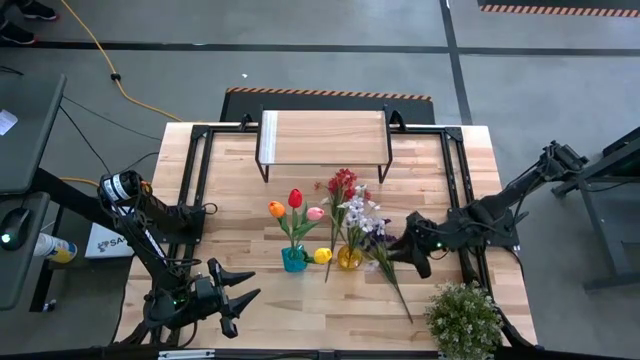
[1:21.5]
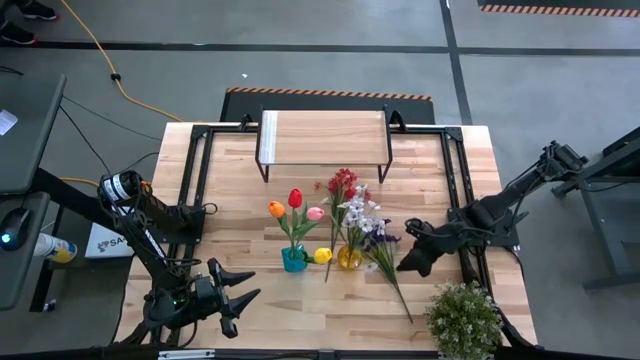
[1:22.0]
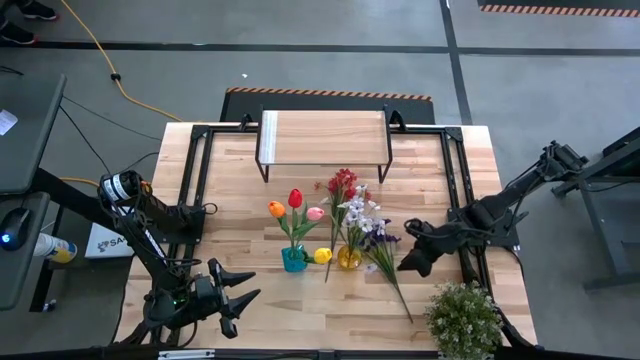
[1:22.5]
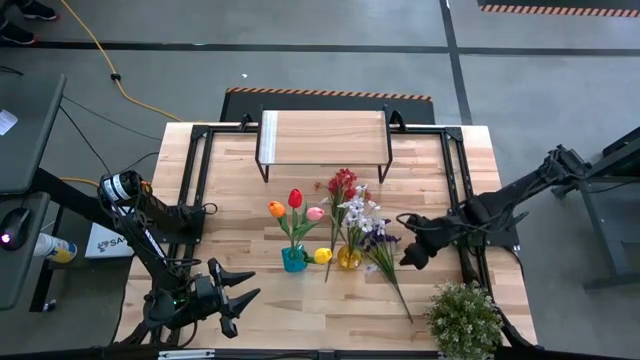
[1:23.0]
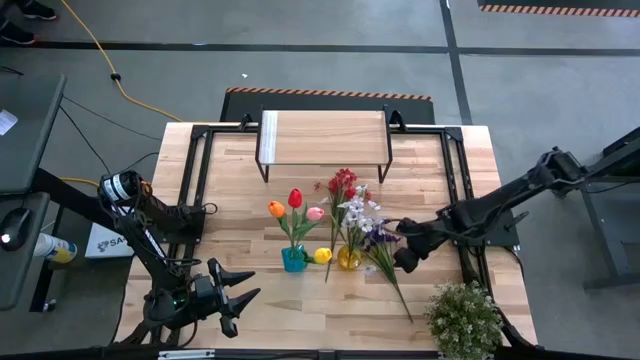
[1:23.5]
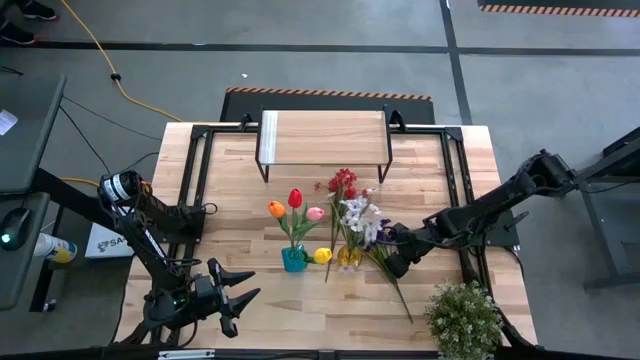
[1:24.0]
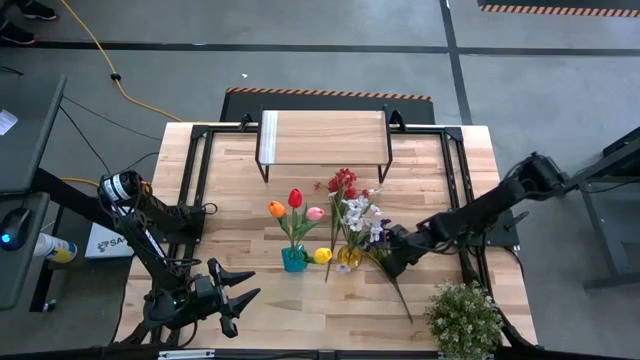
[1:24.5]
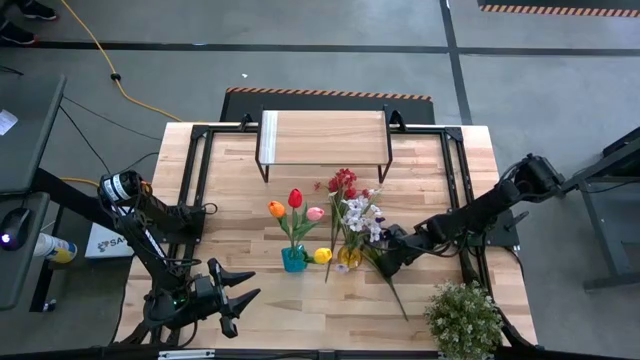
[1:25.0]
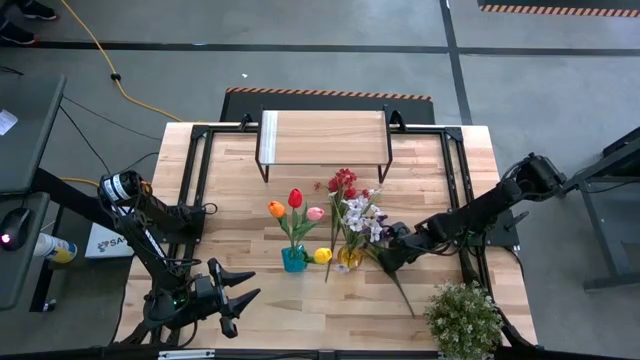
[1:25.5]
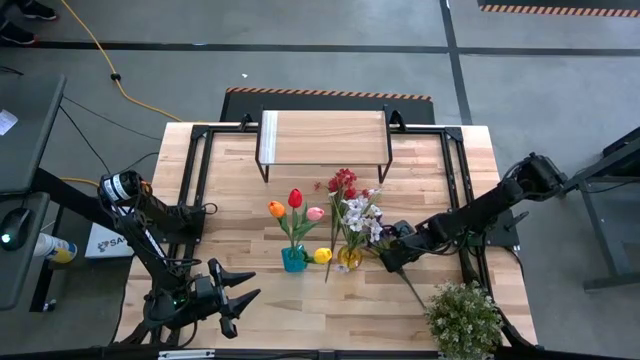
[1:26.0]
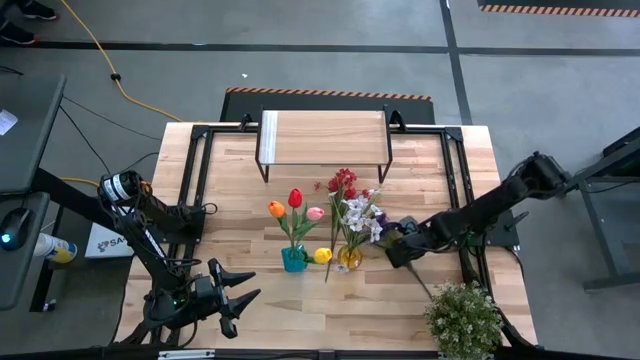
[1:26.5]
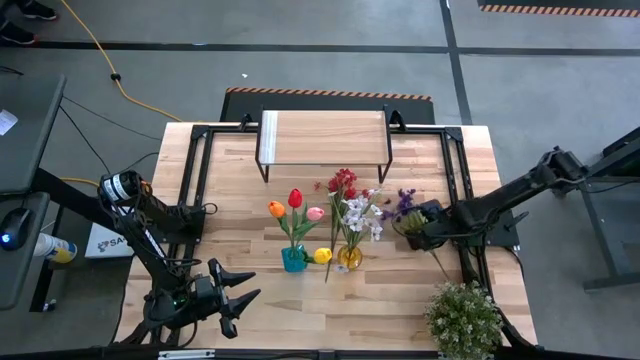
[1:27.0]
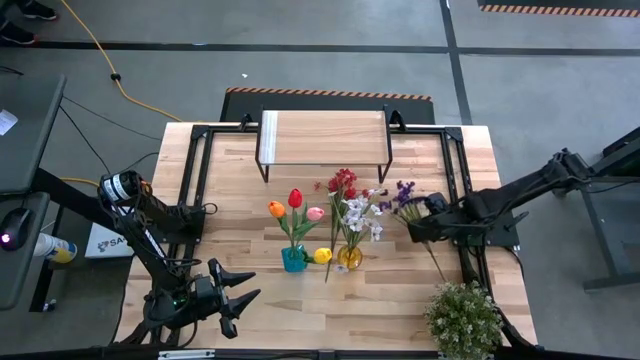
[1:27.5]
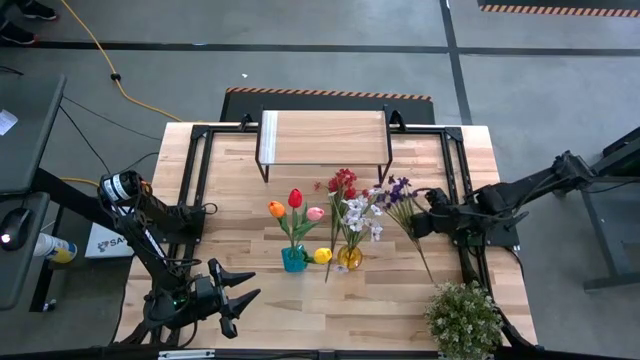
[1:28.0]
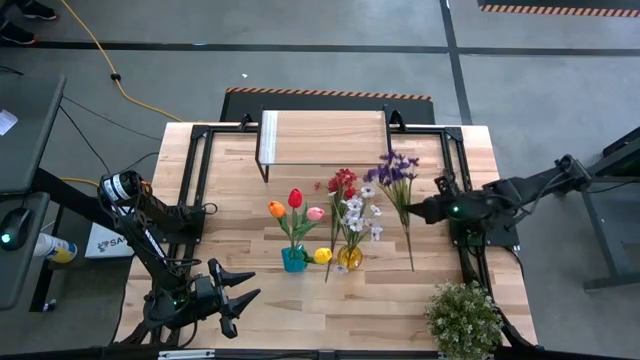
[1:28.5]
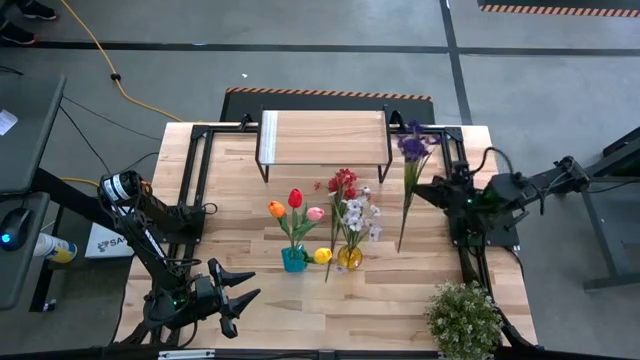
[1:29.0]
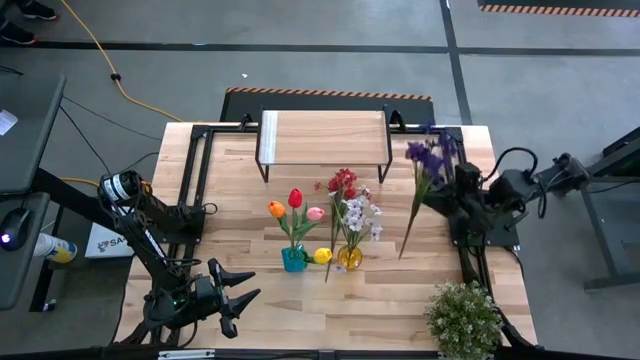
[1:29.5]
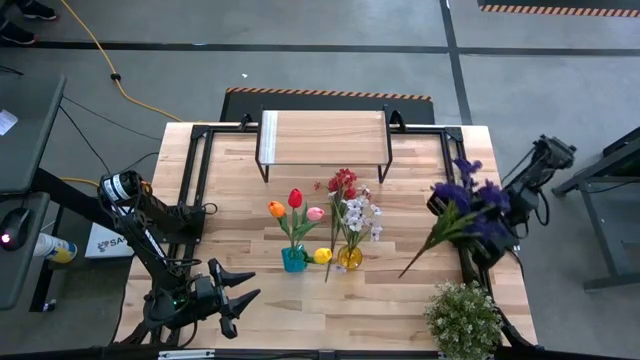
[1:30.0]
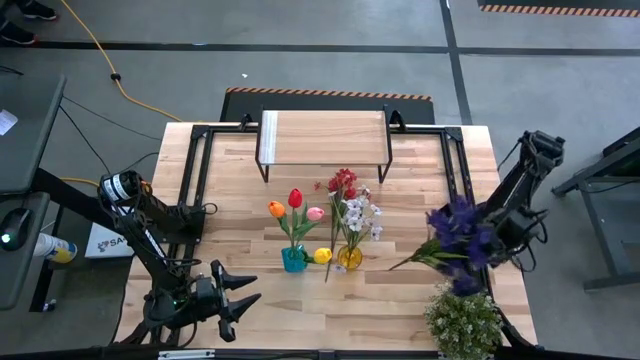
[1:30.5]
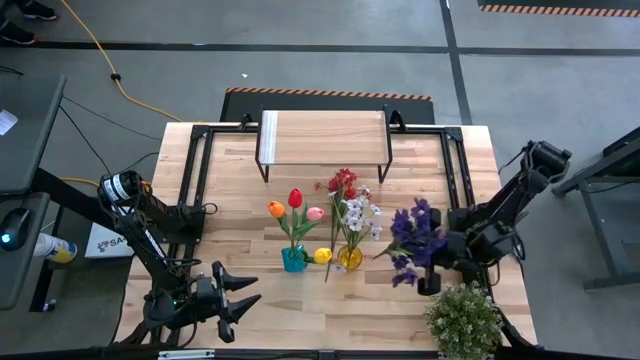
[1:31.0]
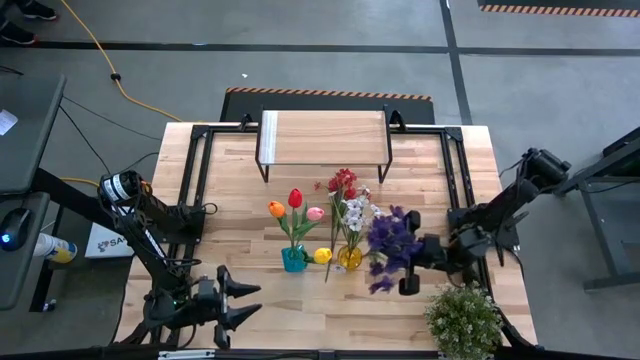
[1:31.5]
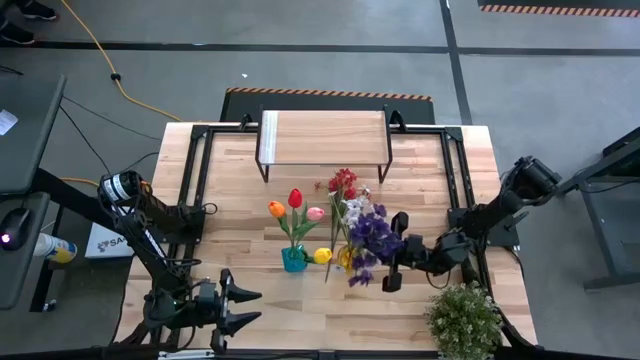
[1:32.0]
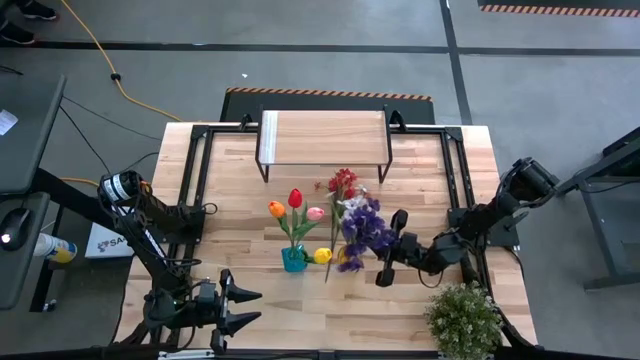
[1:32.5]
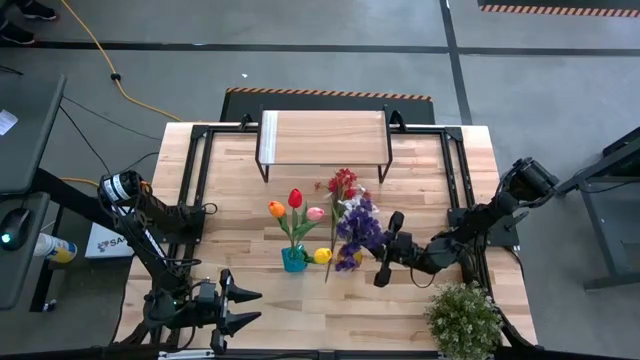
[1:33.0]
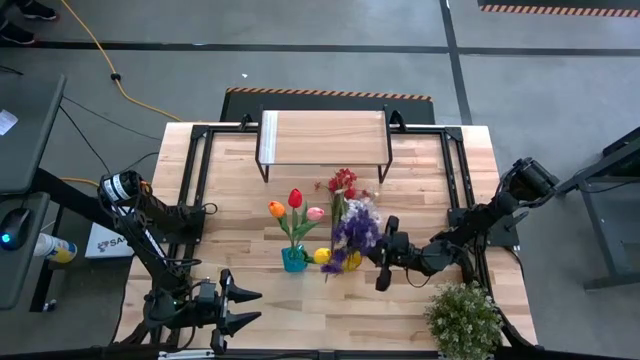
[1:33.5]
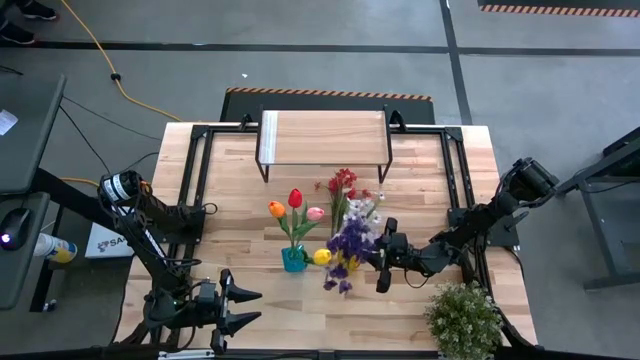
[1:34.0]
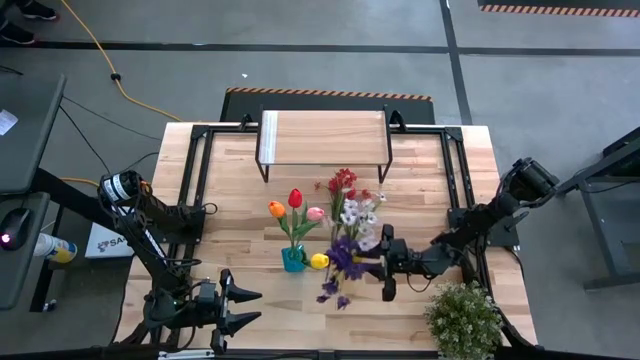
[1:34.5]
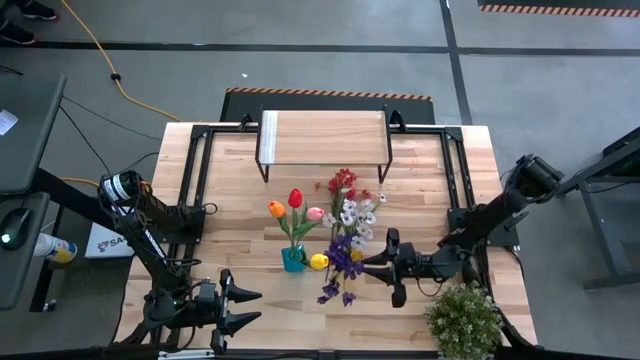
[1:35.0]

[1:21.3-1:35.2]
Task: Pick and place flowers into a vace then onto a shelf
Put the purple flowers into the yellow vase

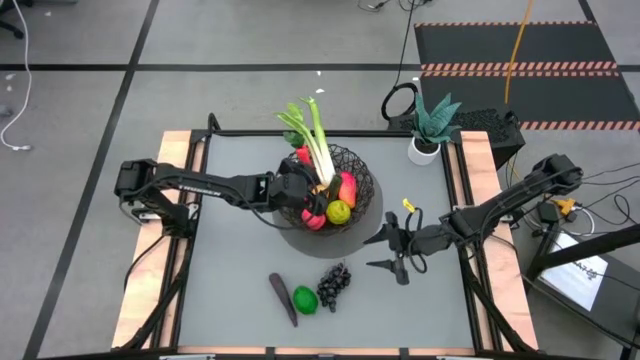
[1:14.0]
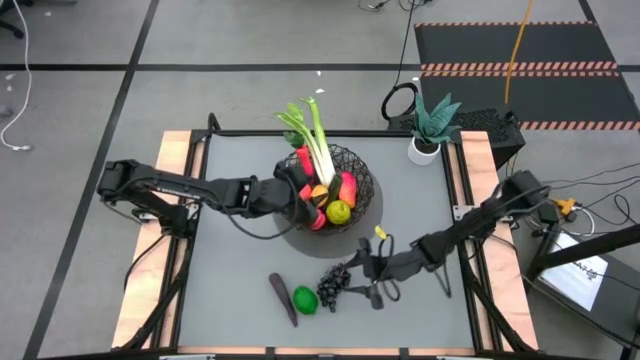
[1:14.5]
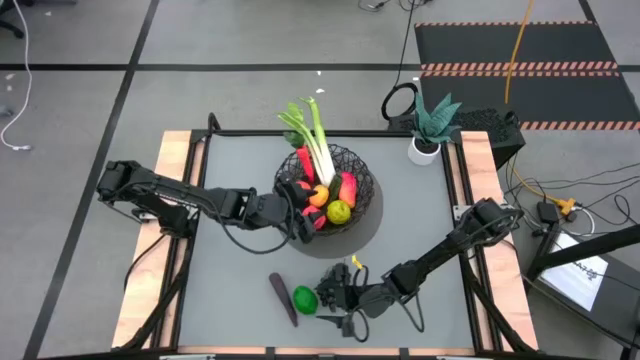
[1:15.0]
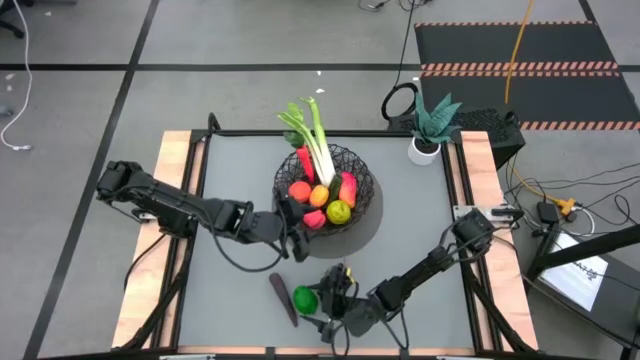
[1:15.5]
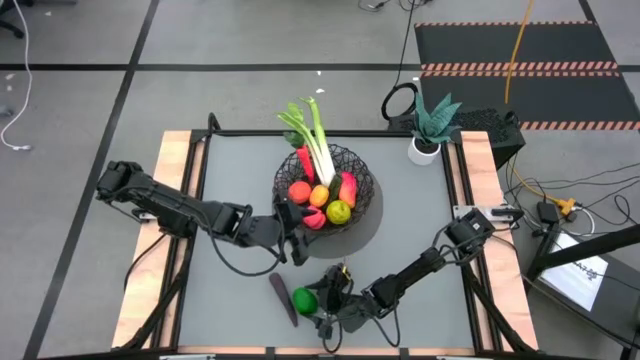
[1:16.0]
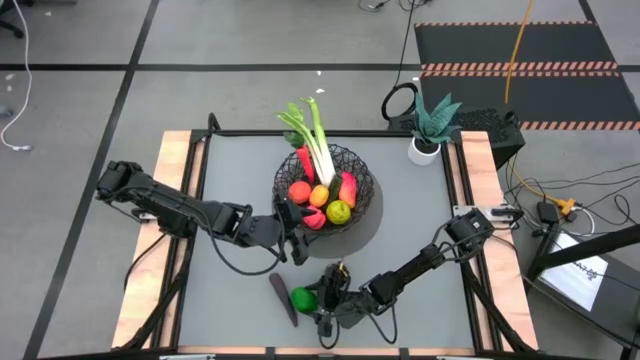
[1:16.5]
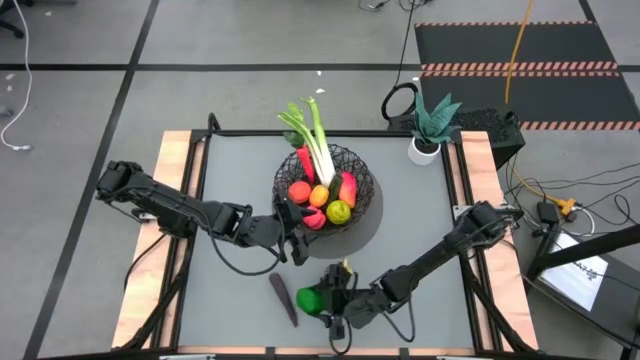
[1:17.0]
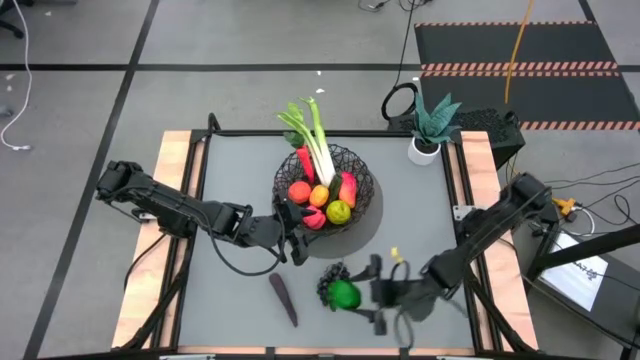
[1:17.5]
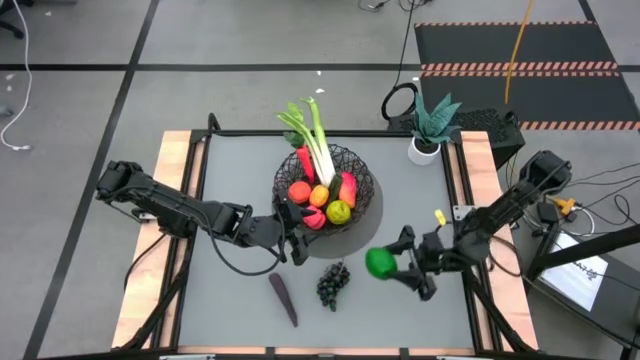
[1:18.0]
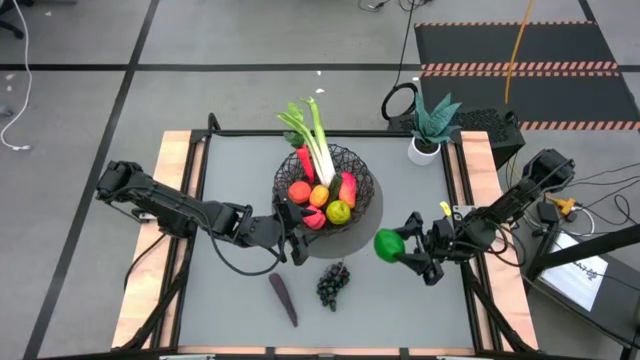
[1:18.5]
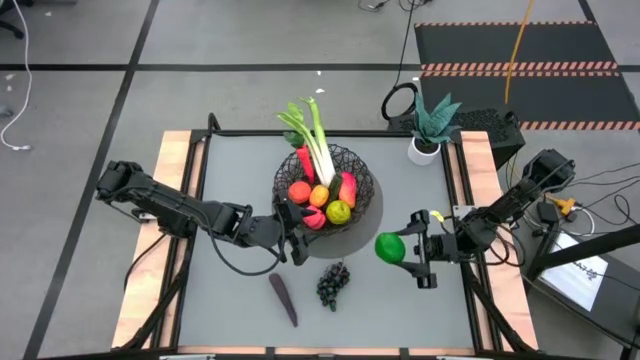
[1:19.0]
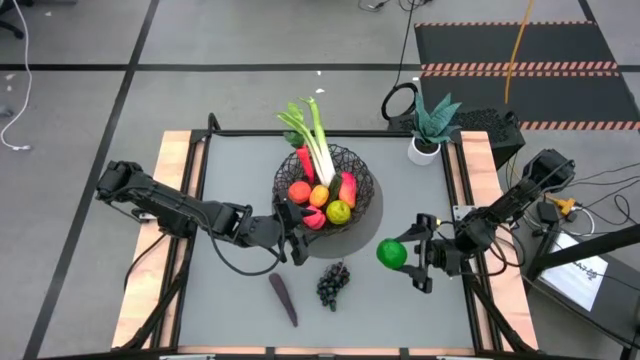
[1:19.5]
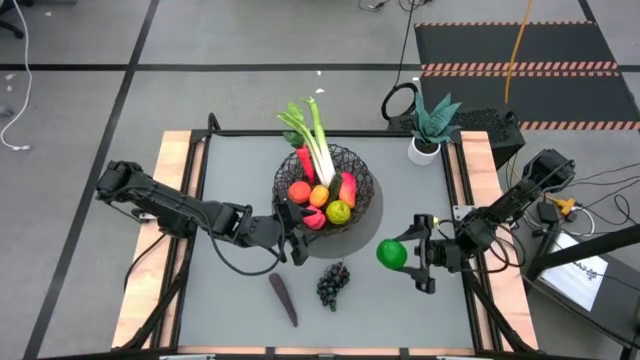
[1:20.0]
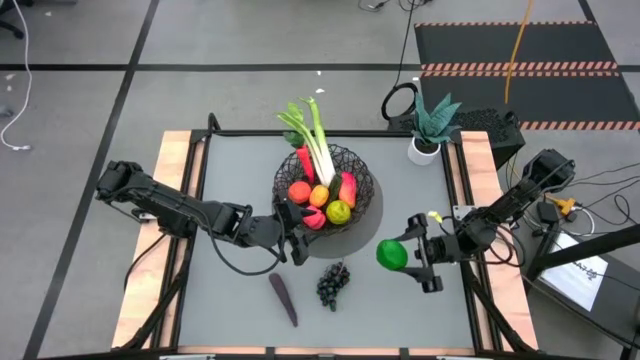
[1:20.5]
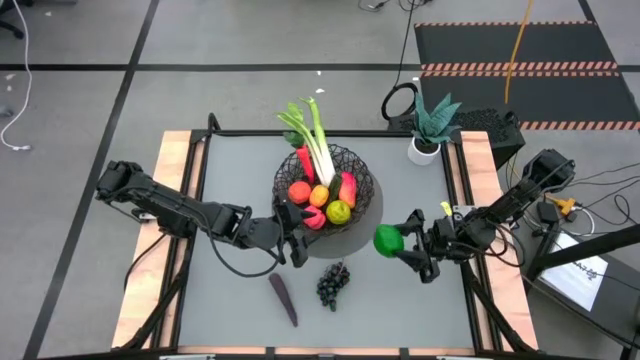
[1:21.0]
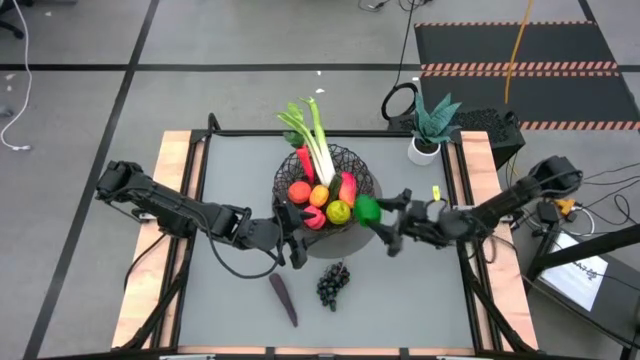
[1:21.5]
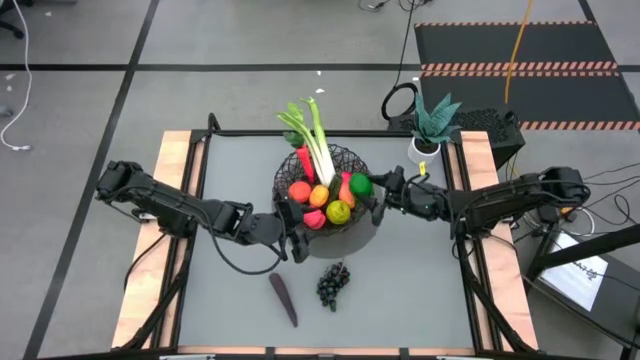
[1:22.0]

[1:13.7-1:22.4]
Task: Build produce basket
Put the green lime into the black woven basket
